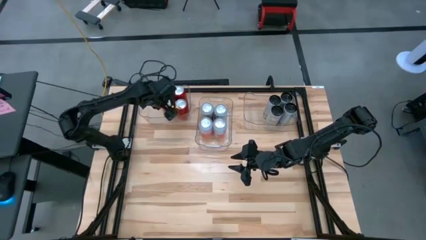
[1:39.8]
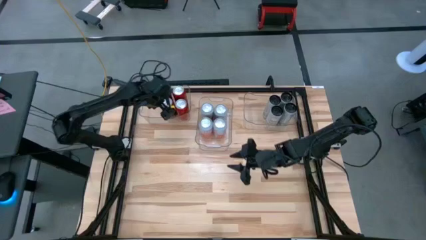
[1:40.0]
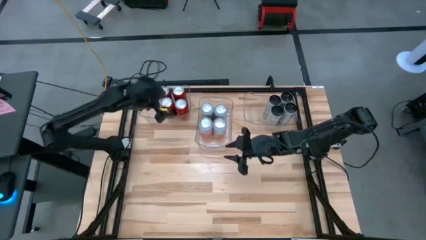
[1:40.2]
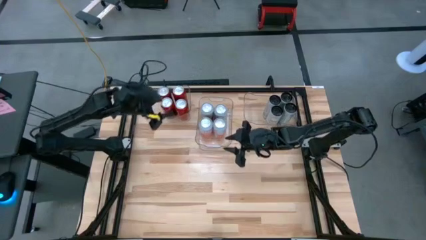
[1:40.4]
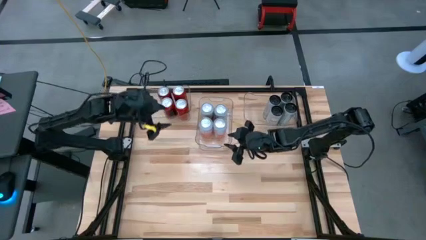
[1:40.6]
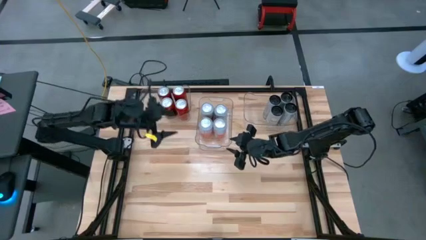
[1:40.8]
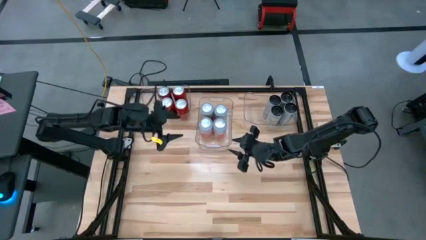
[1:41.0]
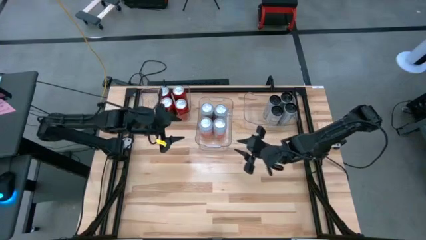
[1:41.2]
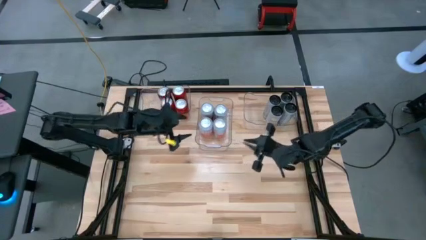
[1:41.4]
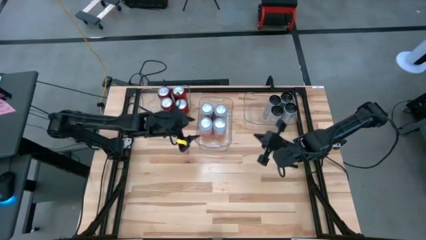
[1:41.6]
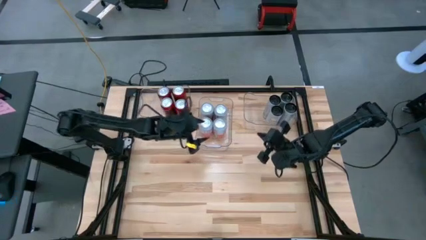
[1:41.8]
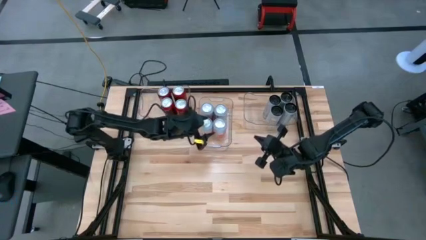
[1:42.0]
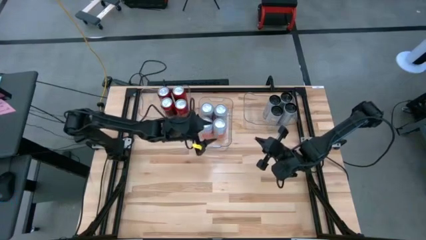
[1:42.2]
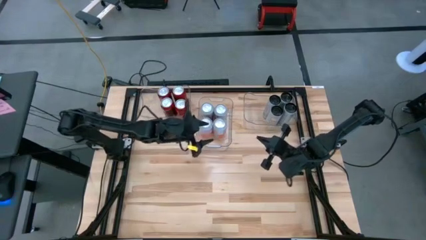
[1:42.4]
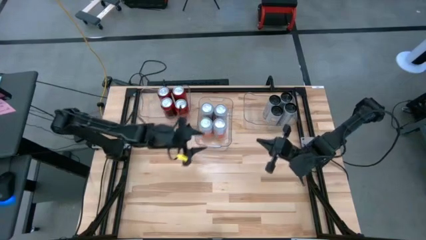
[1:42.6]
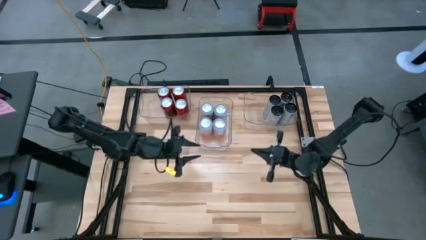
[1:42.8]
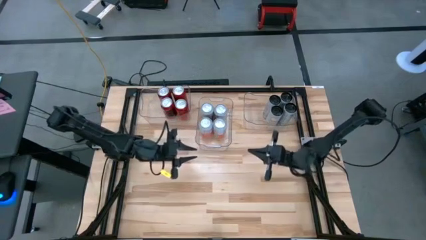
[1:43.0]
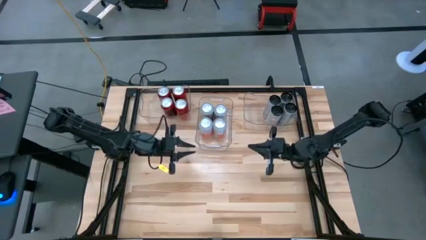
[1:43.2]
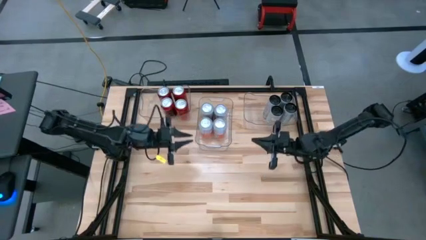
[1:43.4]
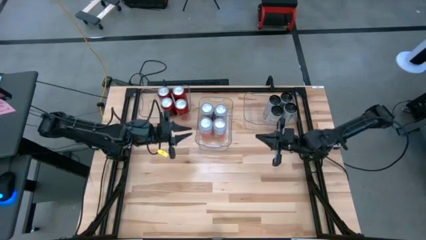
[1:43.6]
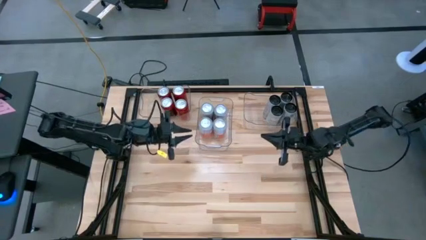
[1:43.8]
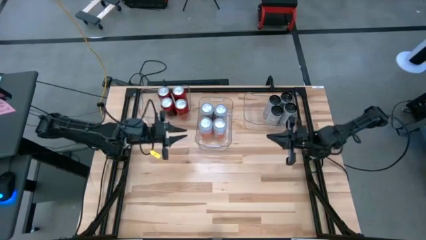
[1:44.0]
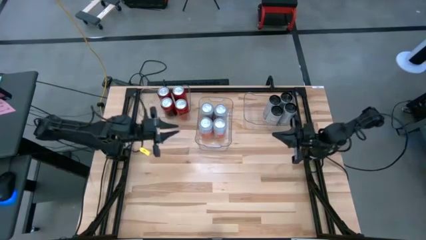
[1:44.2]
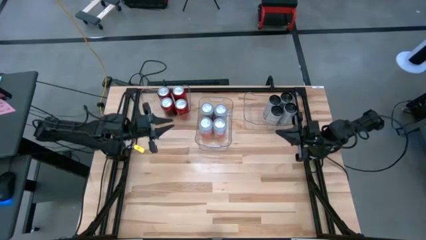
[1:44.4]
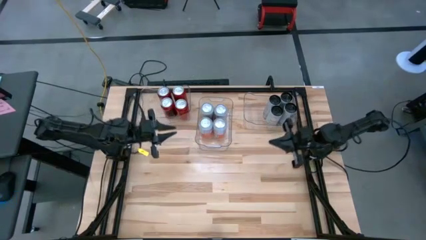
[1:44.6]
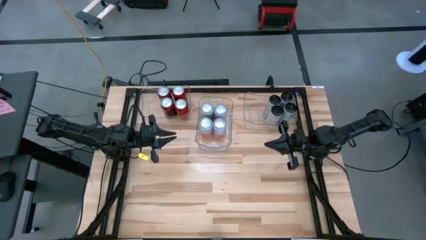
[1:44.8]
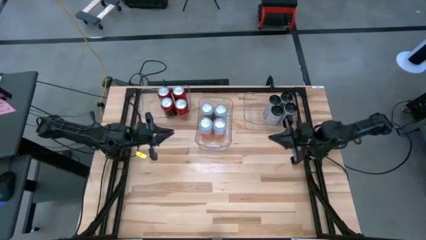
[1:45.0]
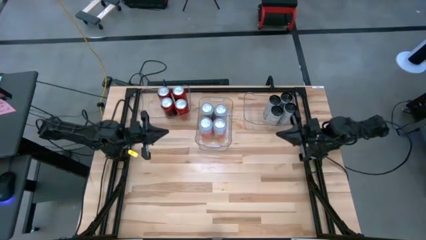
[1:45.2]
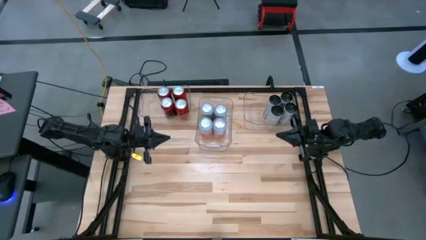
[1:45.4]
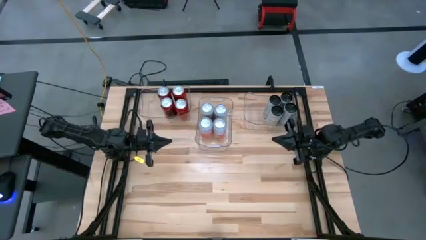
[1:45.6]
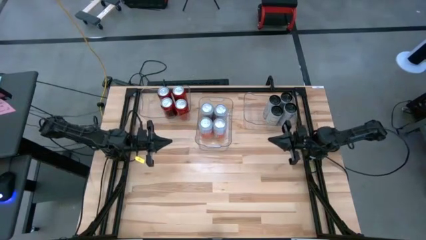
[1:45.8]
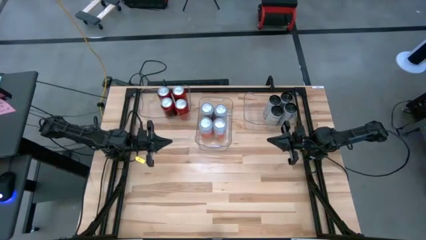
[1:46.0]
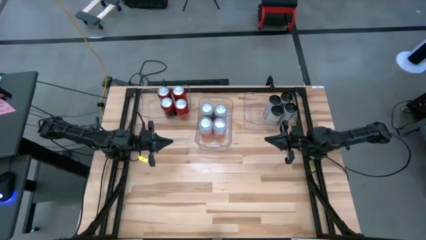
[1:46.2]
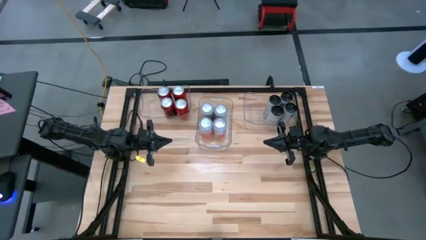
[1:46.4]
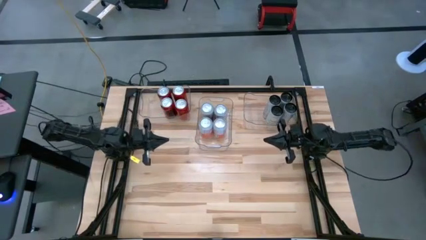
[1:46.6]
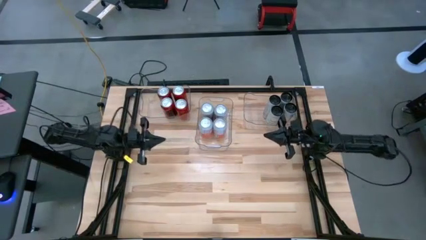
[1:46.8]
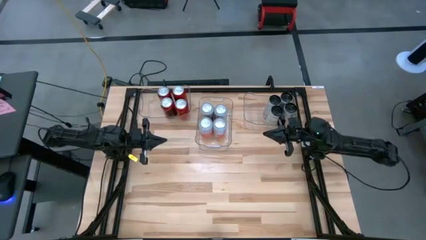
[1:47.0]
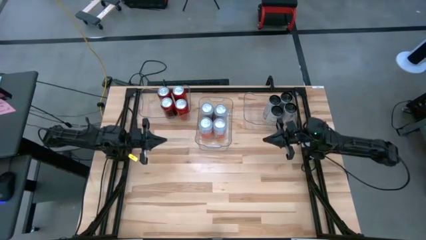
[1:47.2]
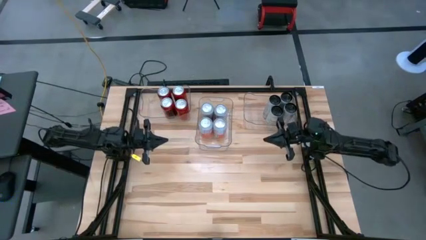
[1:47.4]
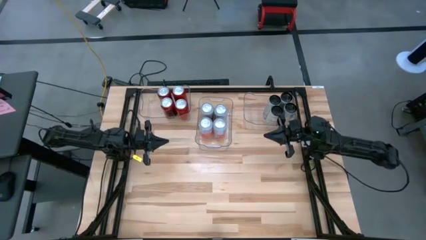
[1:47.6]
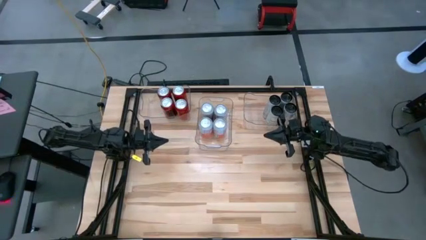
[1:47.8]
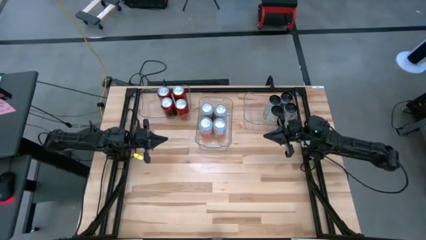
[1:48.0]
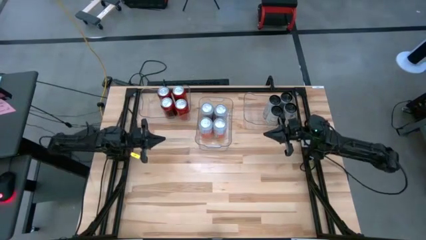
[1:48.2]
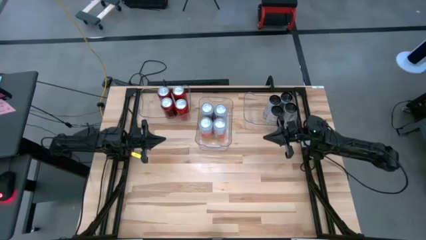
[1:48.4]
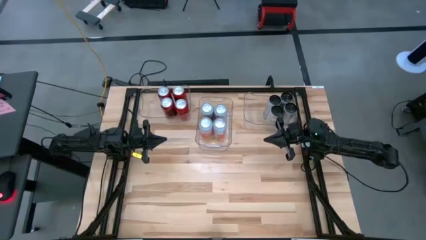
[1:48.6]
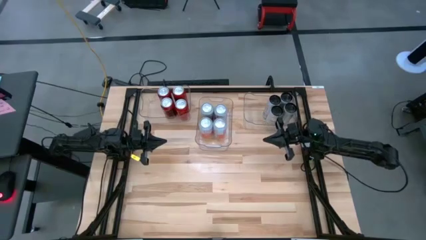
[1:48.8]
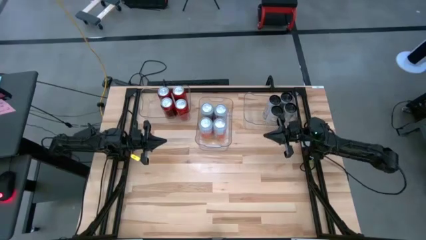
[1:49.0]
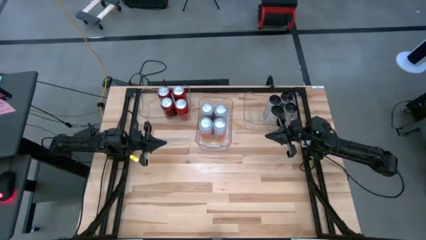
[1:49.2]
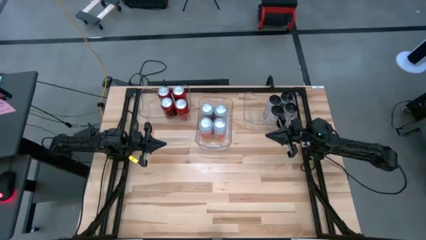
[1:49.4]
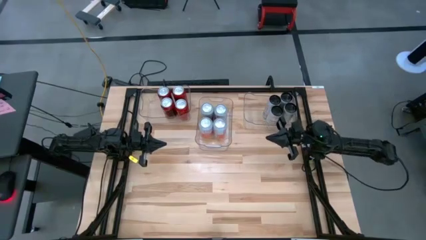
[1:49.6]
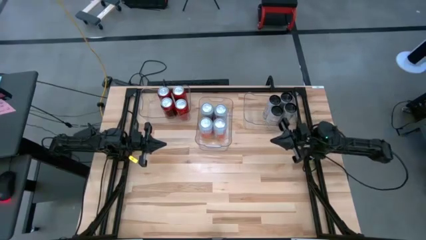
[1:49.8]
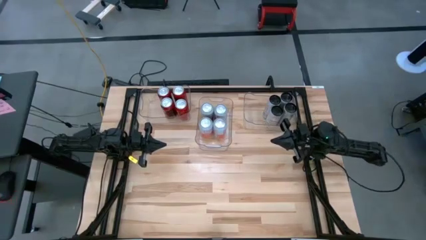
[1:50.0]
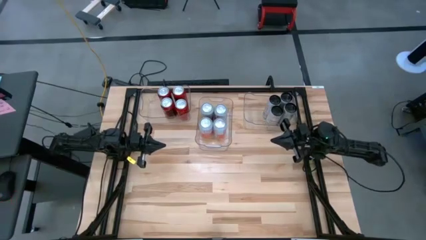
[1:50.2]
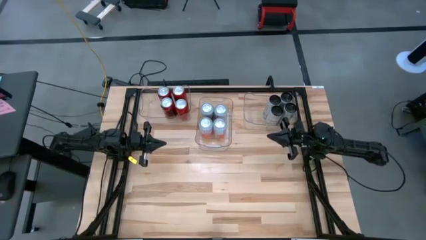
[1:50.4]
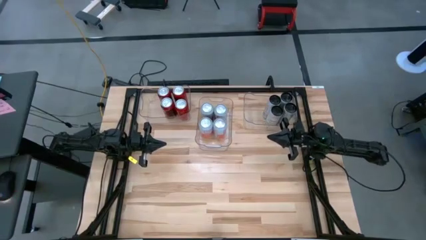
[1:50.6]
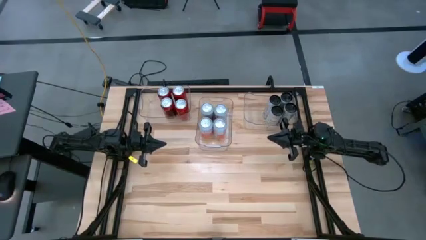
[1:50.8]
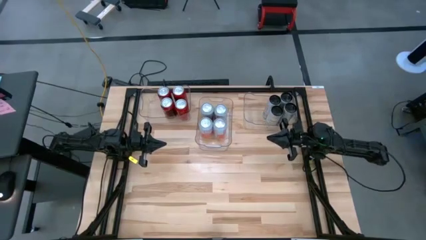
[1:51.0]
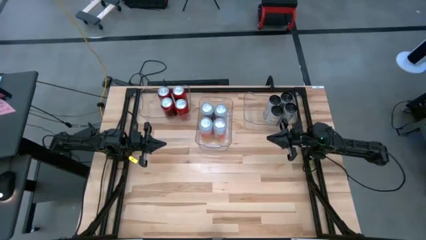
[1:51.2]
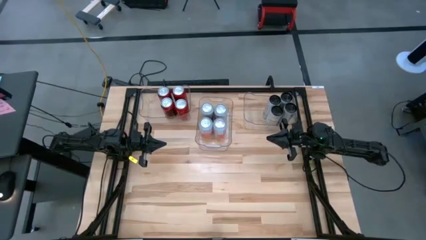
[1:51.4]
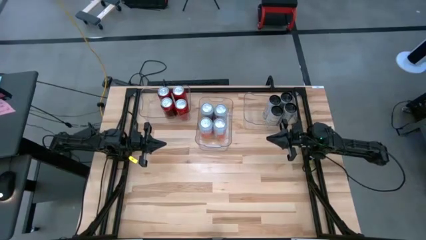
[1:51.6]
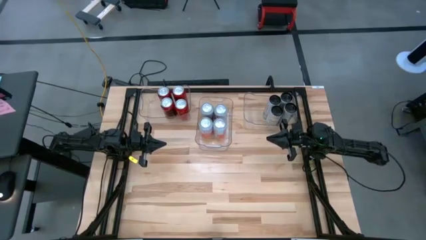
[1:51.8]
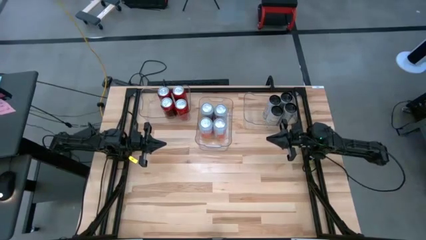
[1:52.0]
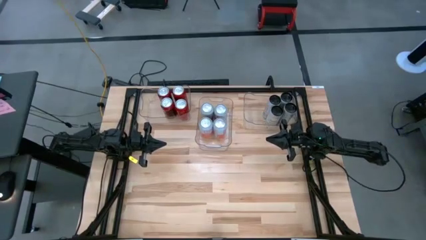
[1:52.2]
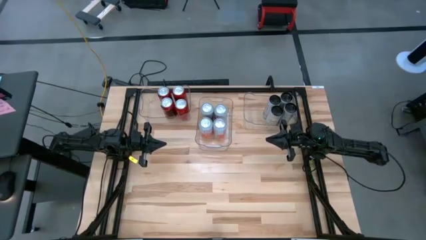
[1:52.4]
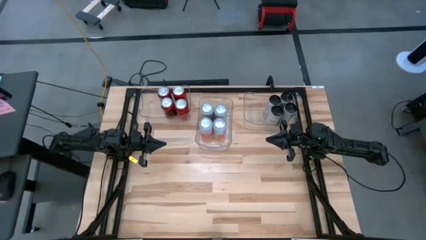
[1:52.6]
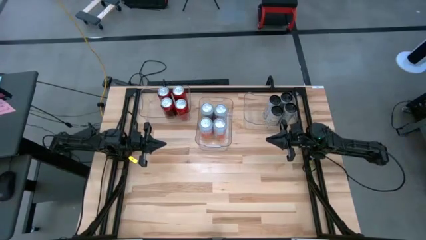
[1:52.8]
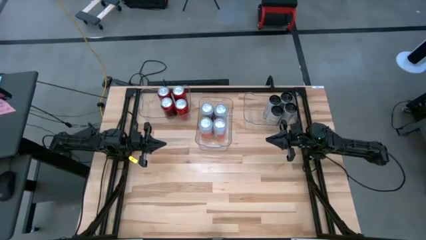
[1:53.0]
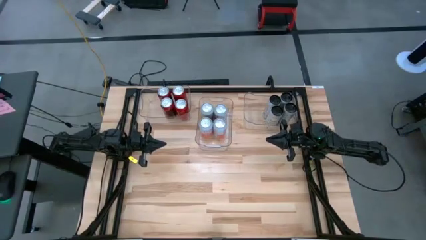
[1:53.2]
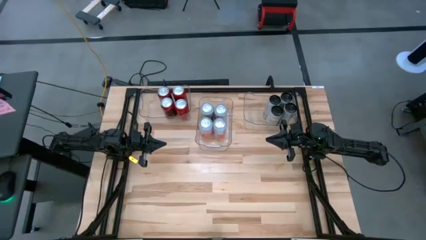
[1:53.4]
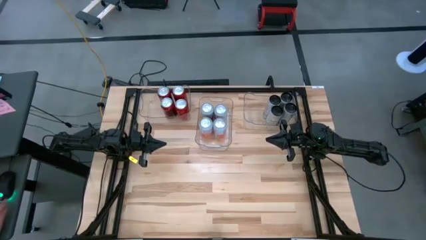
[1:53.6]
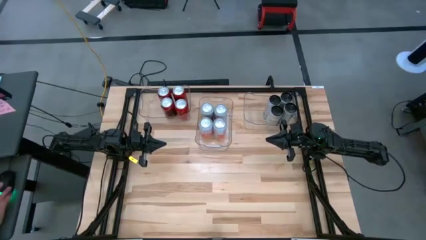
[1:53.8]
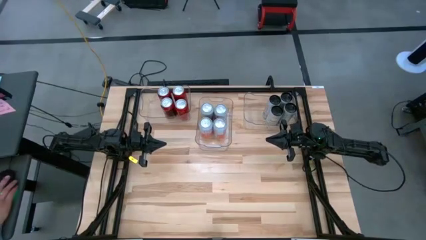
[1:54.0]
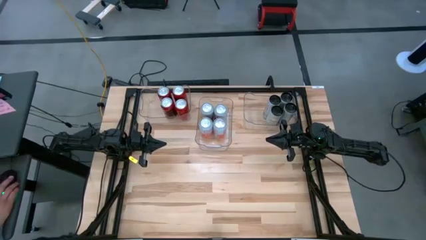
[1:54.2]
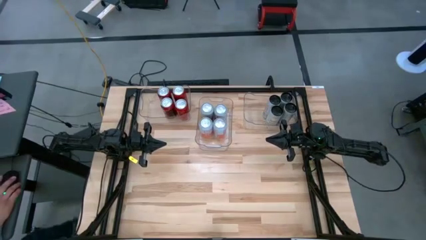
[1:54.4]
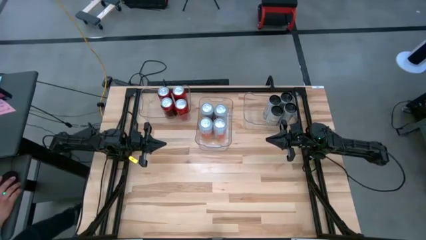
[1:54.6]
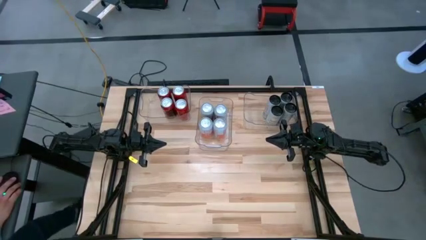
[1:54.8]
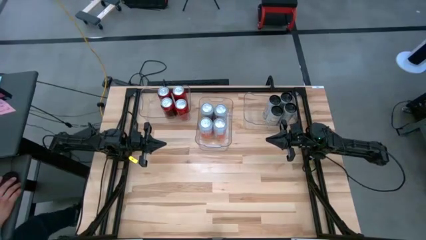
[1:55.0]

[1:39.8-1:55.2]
Task: Sort soda cans
Return to Home Position

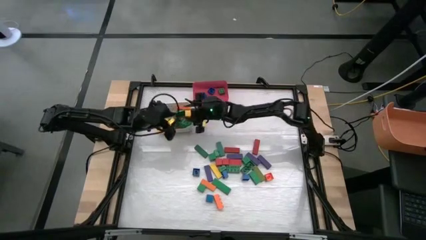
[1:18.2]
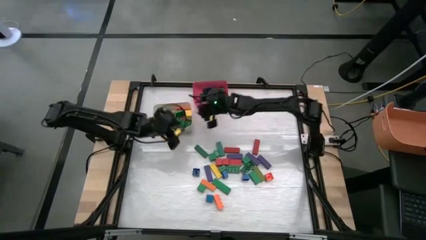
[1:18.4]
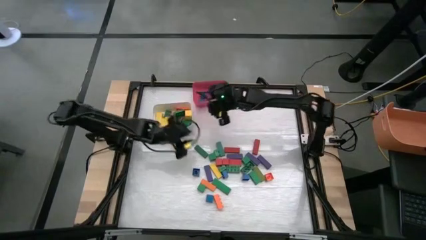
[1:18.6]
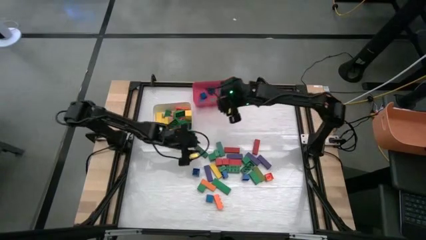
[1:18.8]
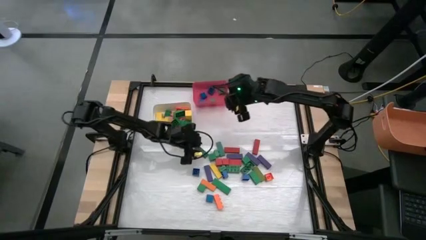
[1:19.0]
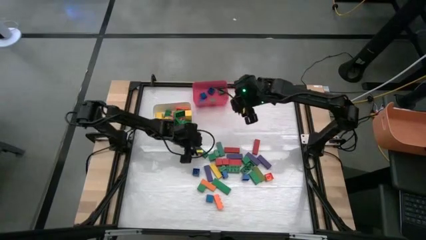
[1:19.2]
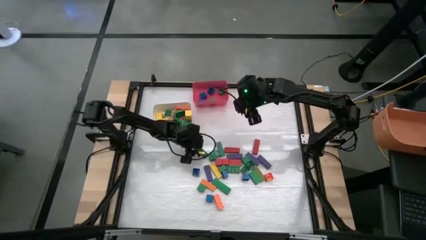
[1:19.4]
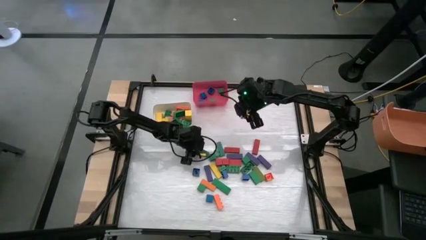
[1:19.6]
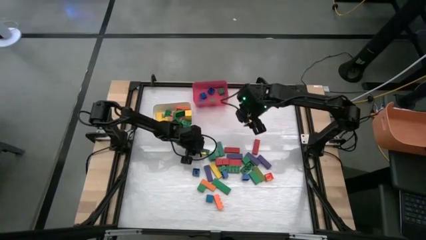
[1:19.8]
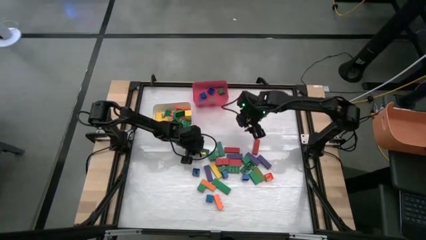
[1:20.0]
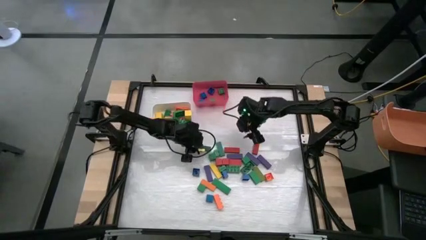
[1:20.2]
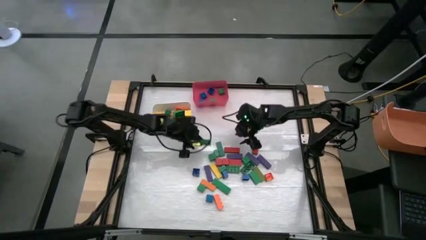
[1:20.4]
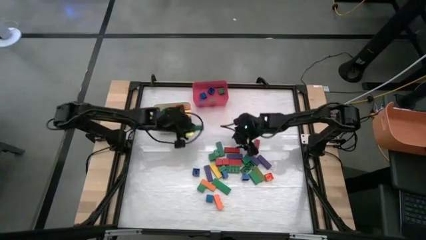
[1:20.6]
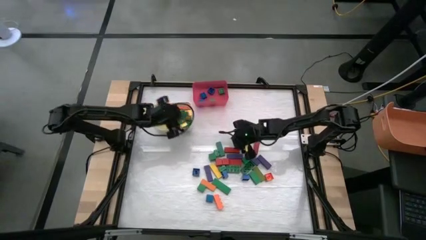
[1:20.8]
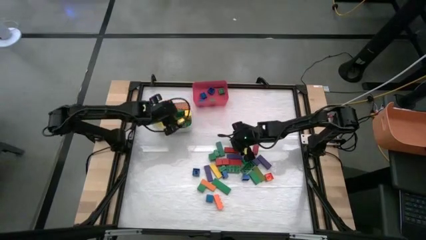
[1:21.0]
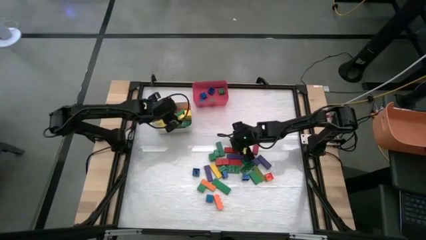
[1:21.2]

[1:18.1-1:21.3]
Task: Sort blocks by size
Put the large green wooden block into the white bin
